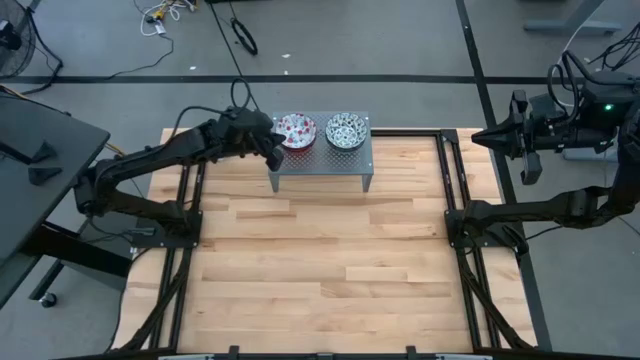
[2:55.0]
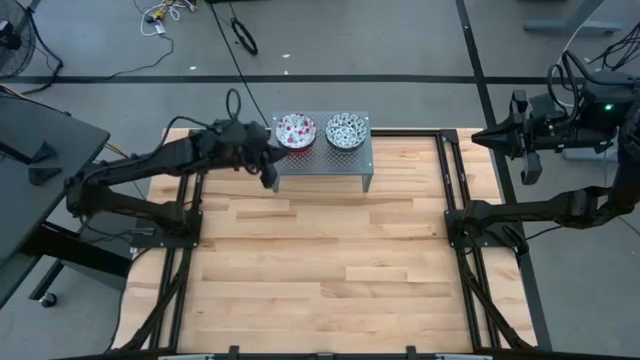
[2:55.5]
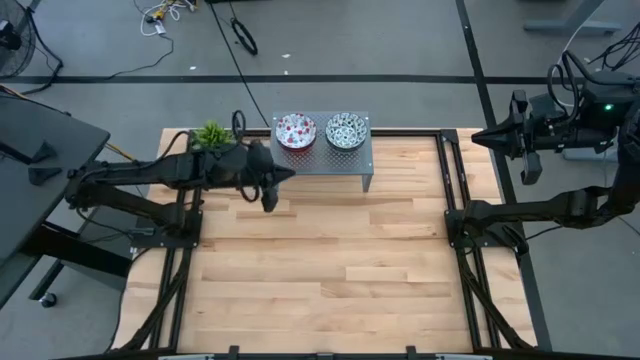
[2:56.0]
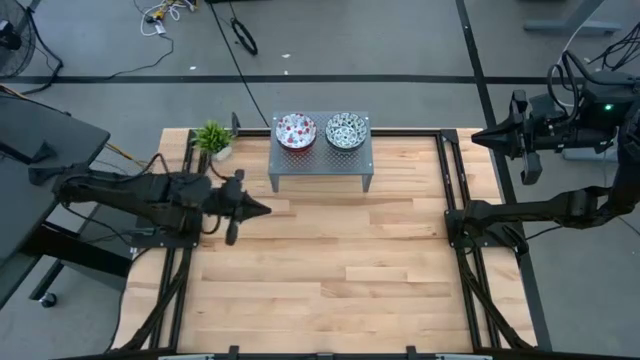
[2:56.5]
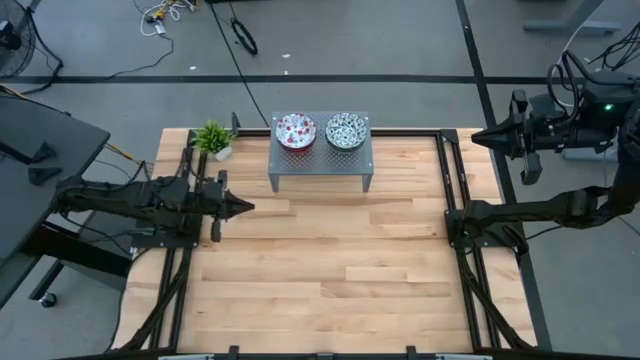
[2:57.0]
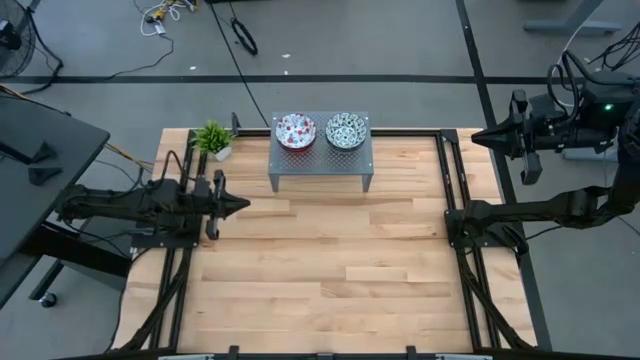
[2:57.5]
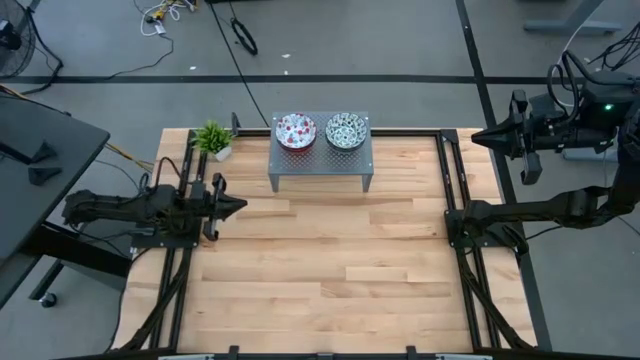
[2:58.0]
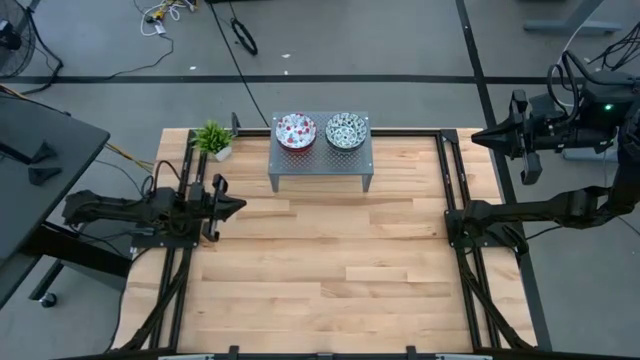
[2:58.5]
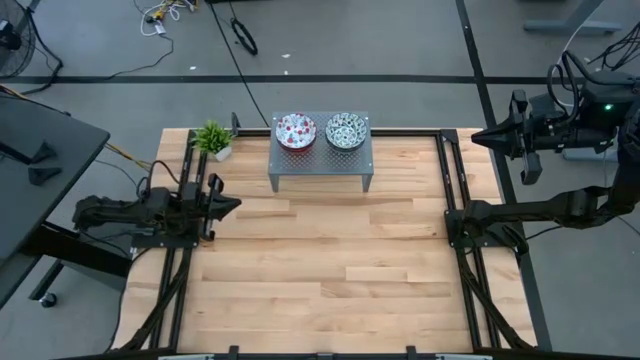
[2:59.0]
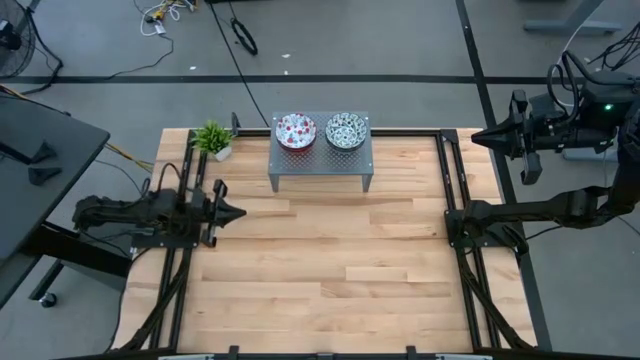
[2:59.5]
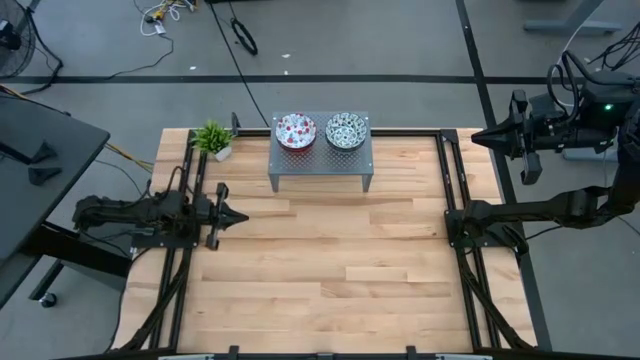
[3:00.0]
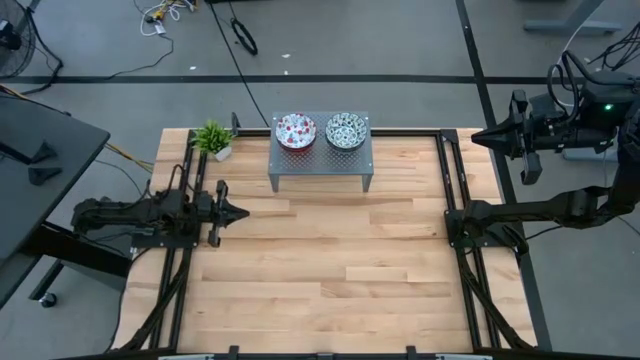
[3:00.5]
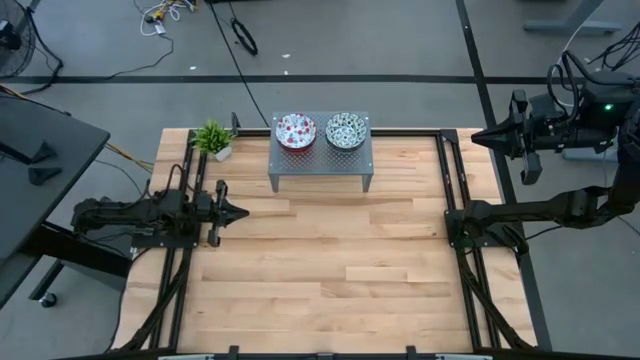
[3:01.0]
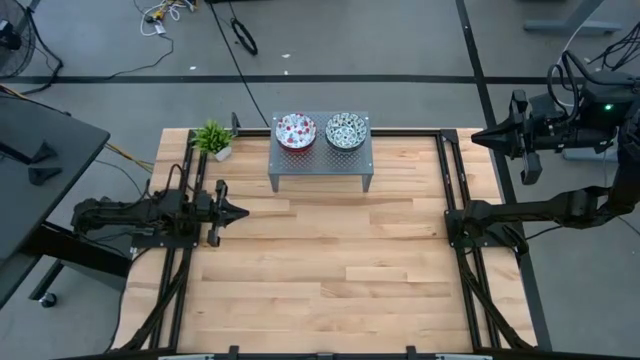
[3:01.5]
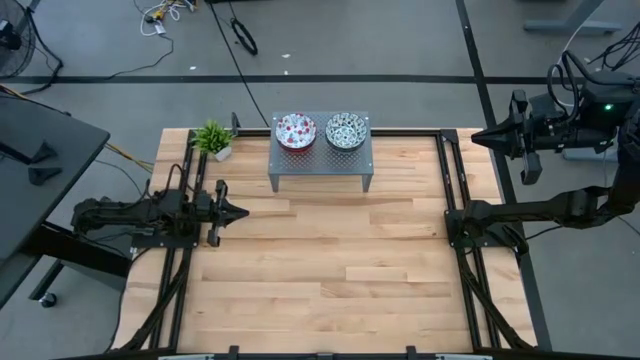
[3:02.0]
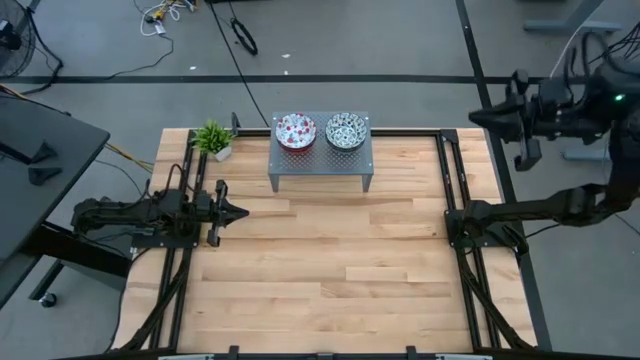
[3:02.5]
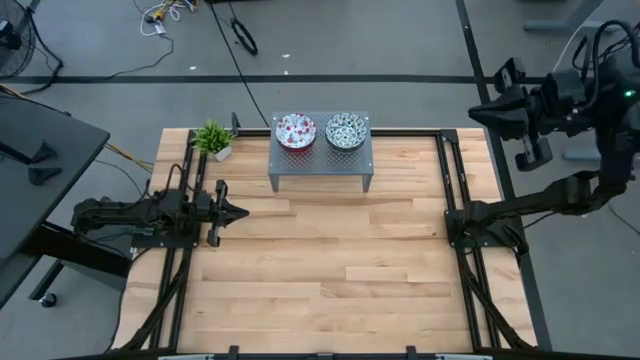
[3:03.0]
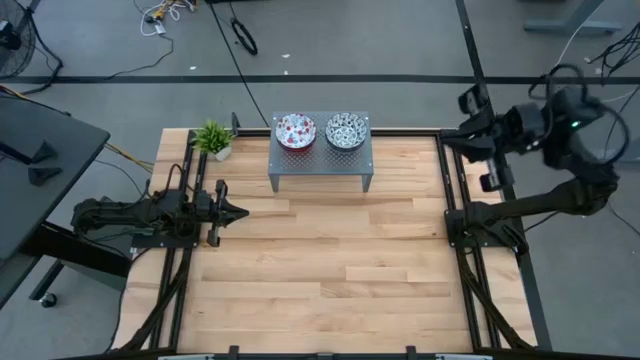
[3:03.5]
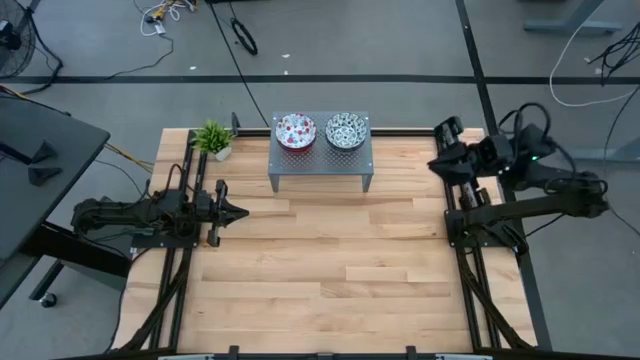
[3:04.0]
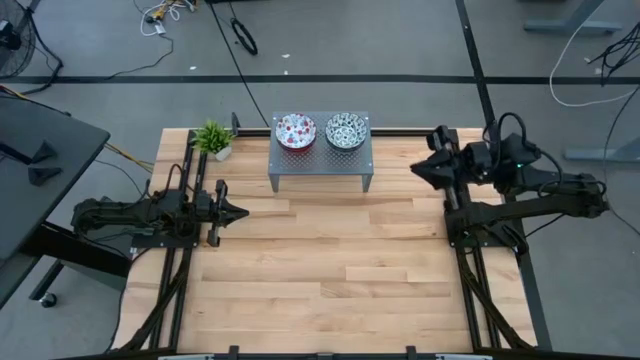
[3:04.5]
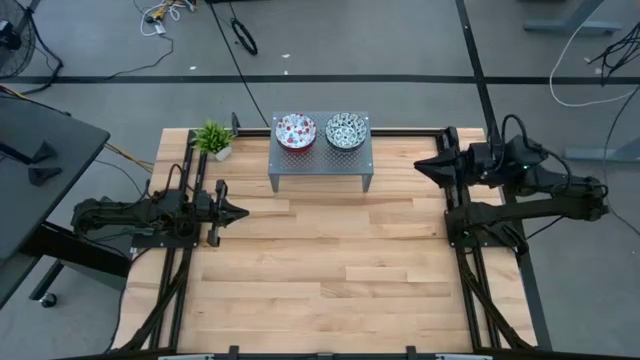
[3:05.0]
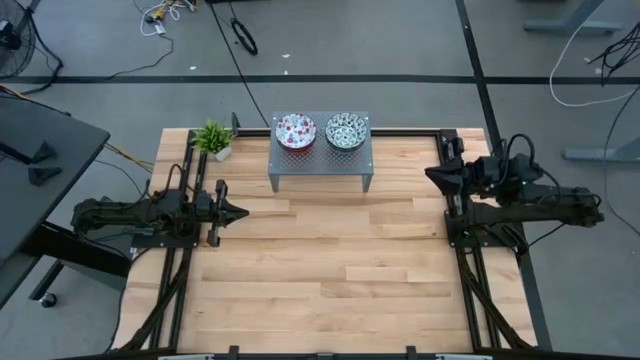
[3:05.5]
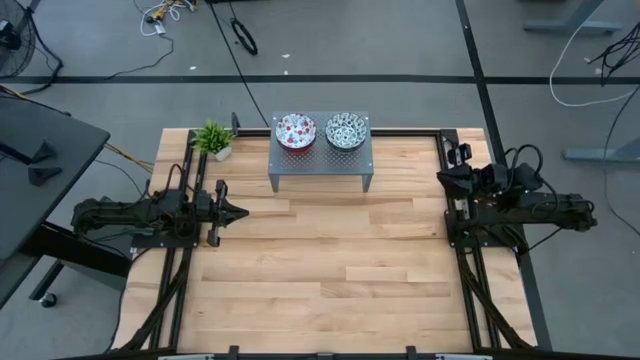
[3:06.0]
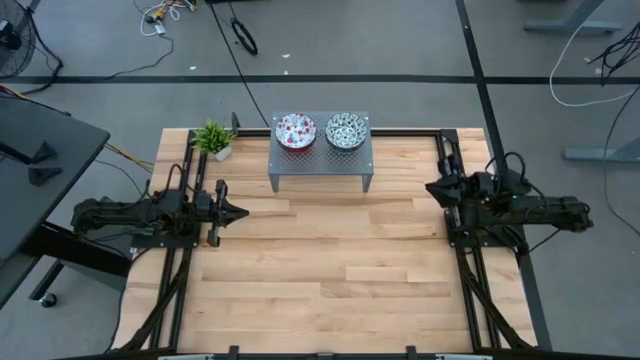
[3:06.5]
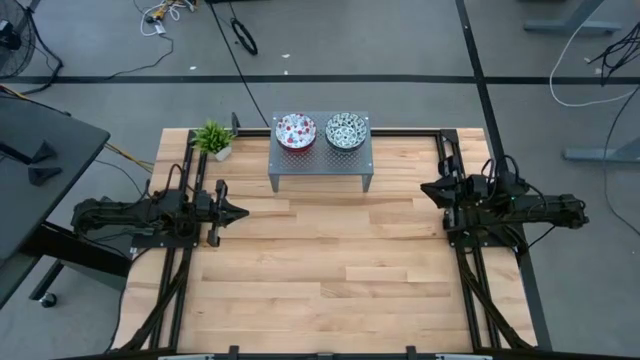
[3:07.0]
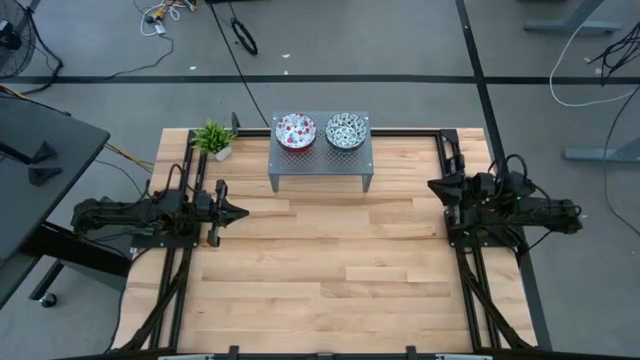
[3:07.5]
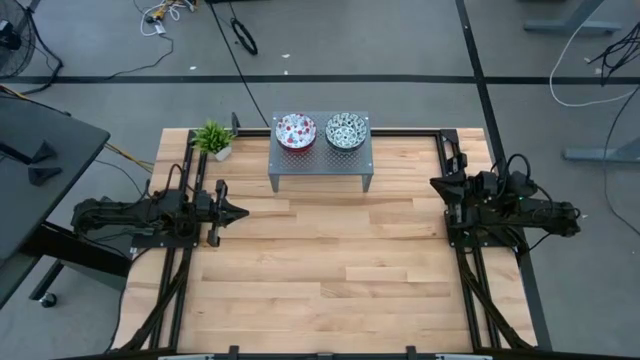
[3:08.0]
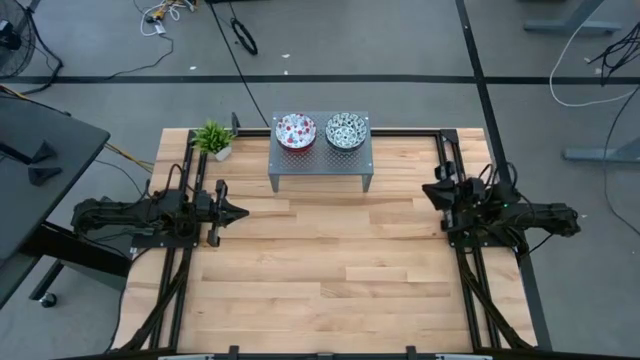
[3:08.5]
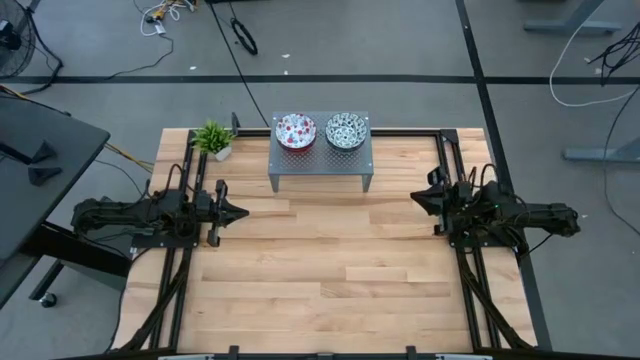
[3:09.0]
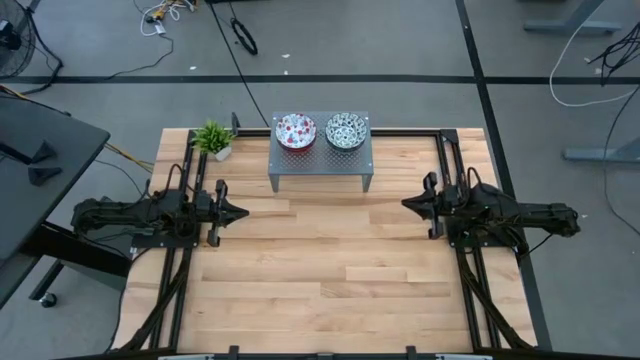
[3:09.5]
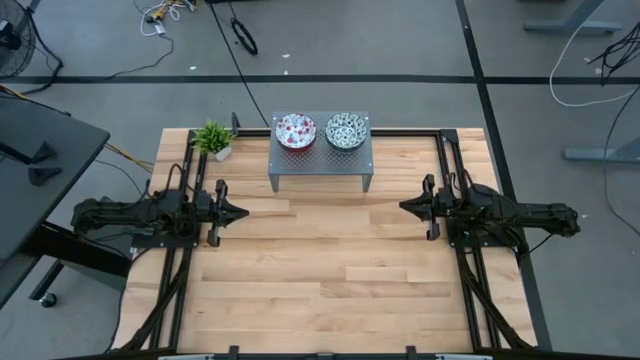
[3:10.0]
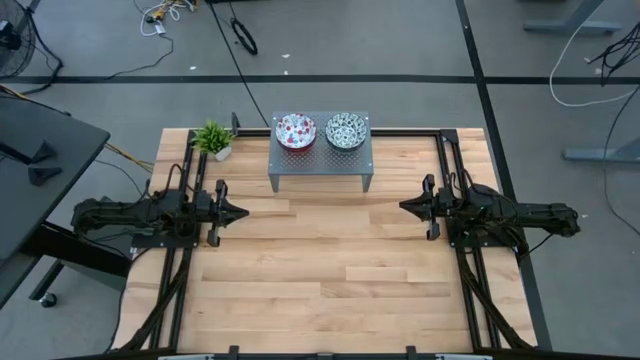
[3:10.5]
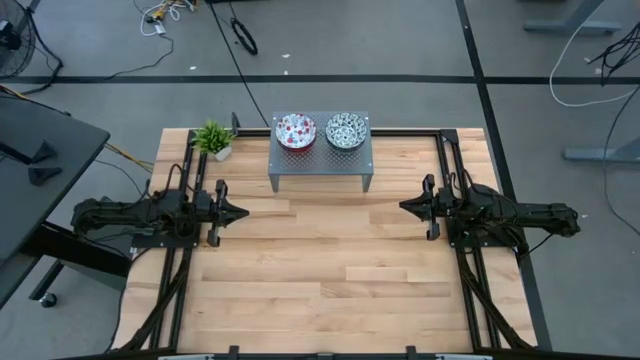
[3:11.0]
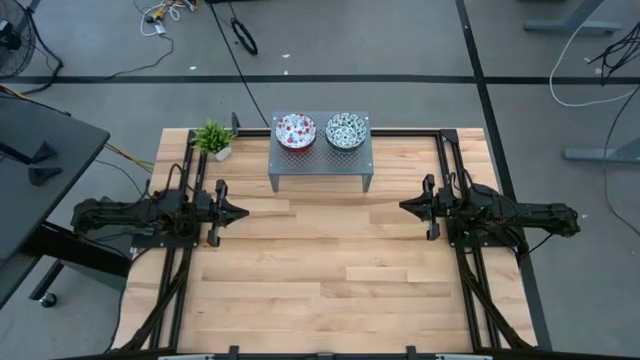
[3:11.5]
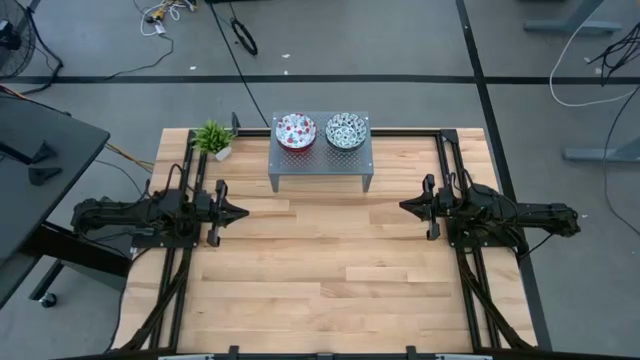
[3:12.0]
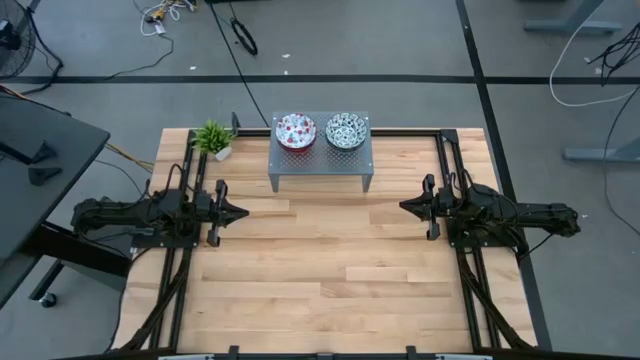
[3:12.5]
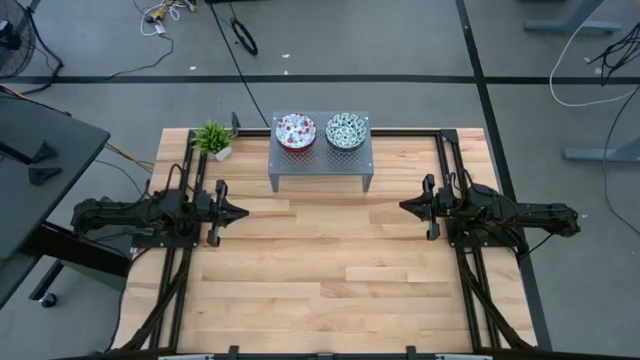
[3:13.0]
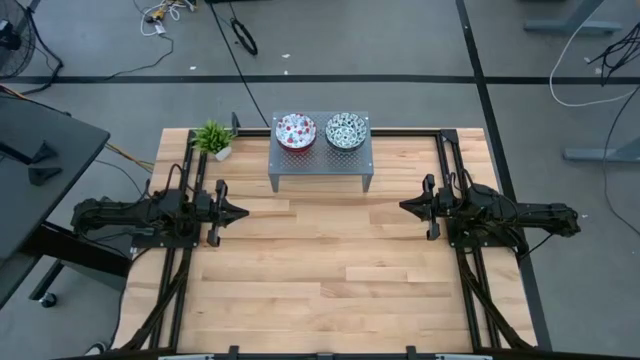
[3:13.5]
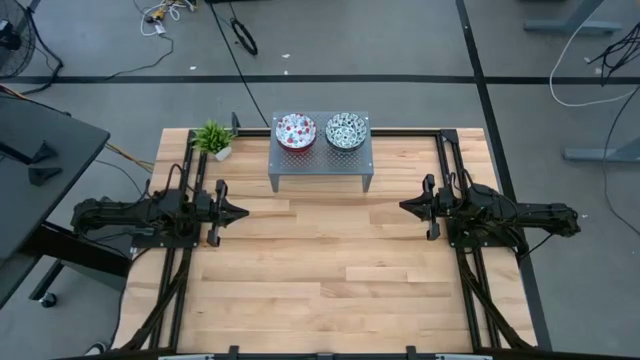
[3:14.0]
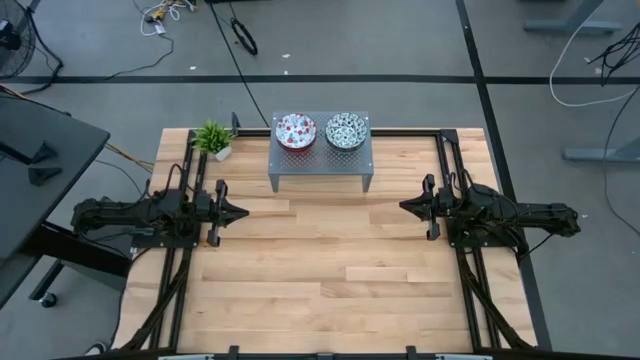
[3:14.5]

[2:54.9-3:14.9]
Task: Pick & Place Mini bowls
Return to Home Position

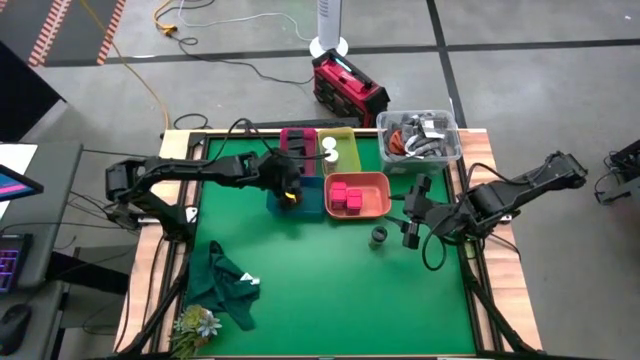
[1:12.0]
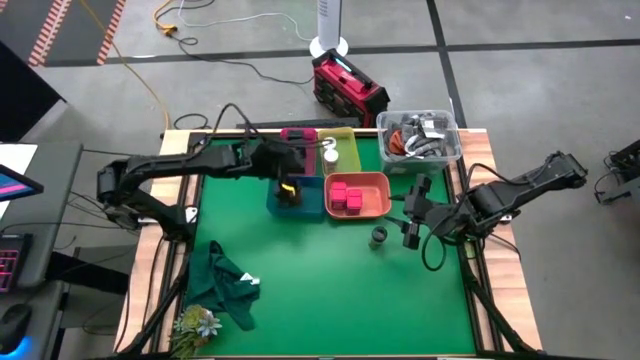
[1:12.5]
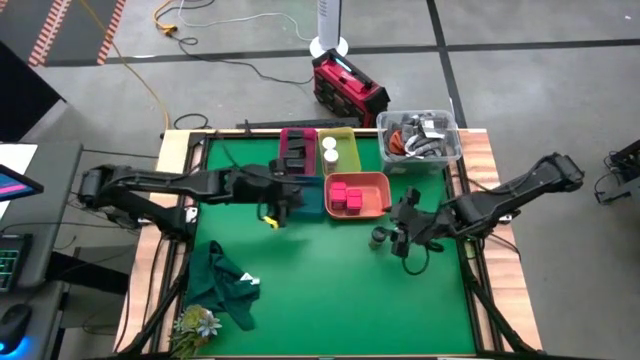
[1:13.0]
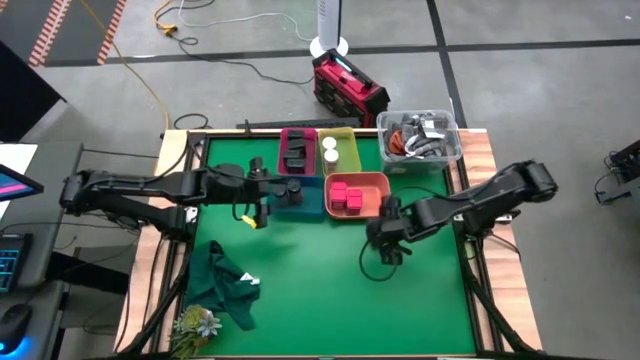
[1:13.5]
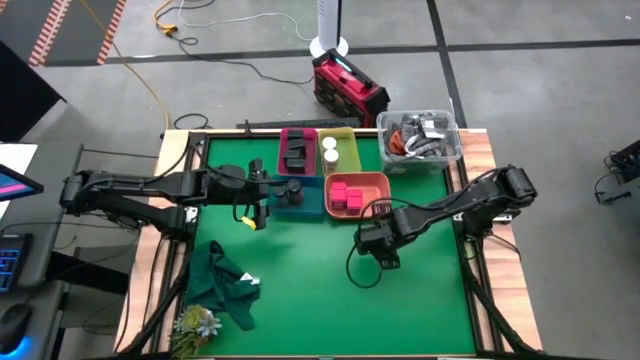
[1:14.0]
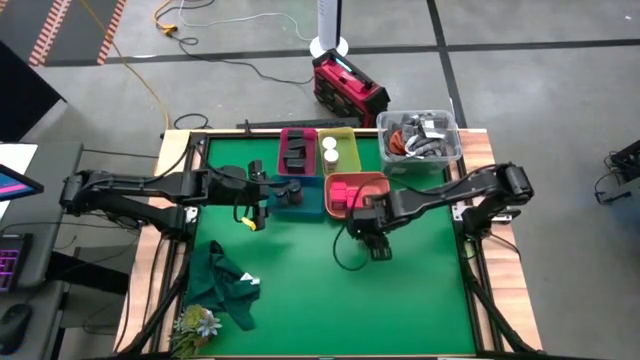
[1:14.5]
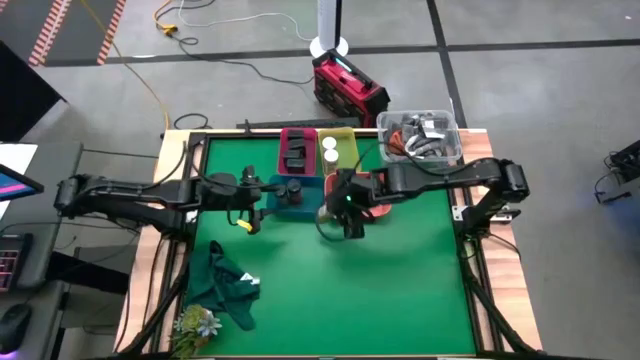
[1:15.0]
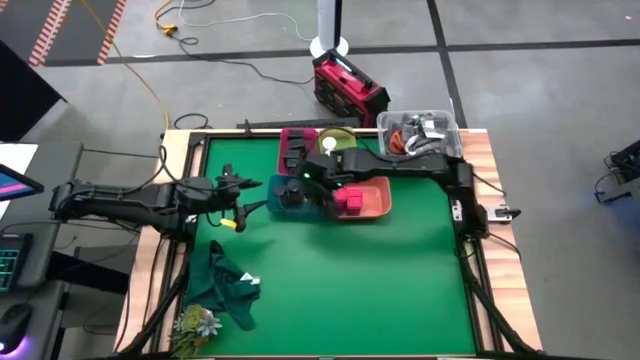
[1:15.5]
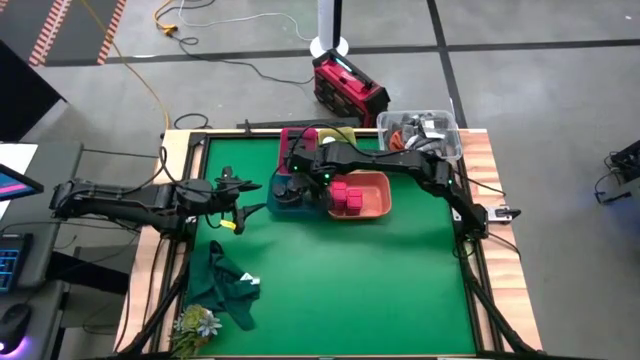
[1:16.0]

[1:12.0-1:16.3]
Task: Sort spices by type
Put the brown seasoning bottle into the blue bin
